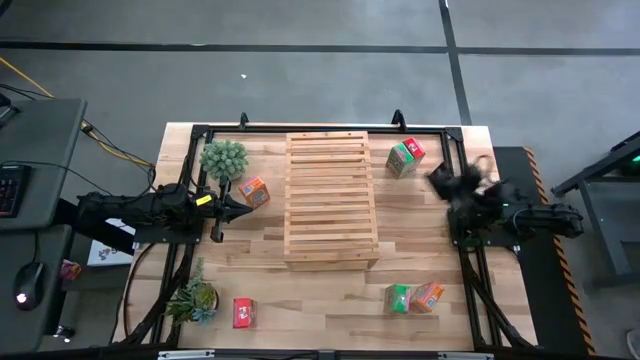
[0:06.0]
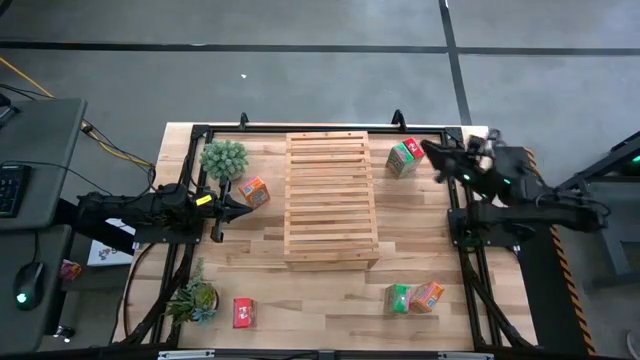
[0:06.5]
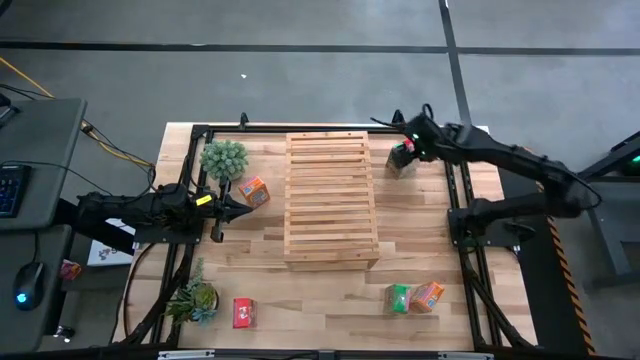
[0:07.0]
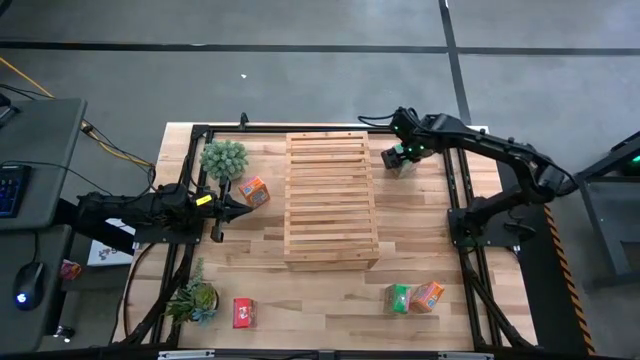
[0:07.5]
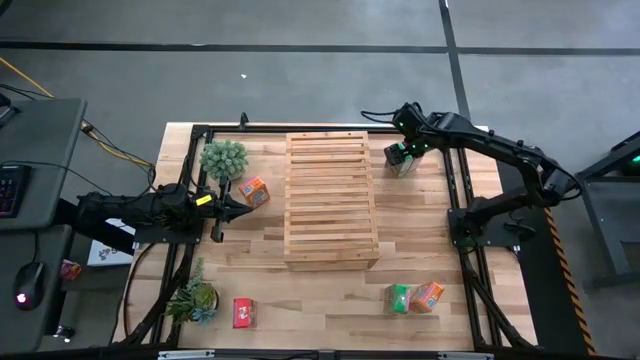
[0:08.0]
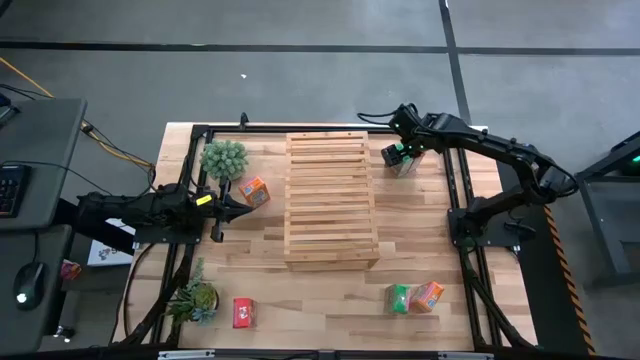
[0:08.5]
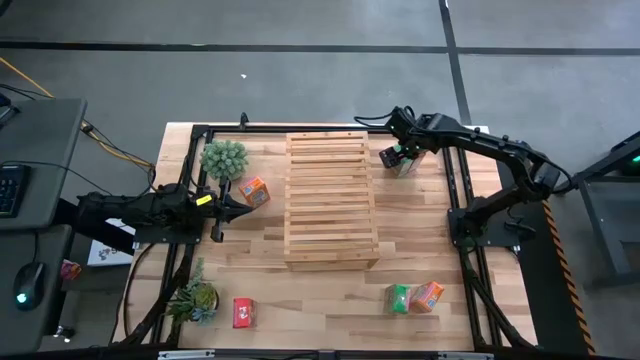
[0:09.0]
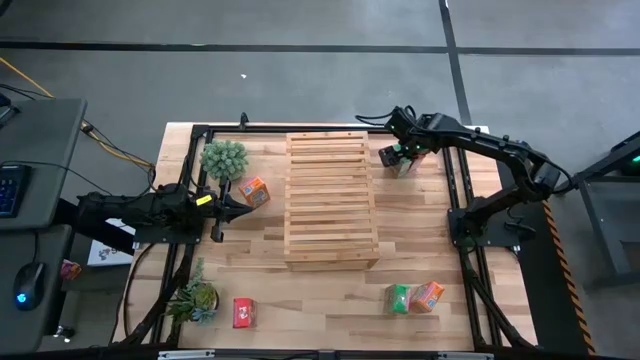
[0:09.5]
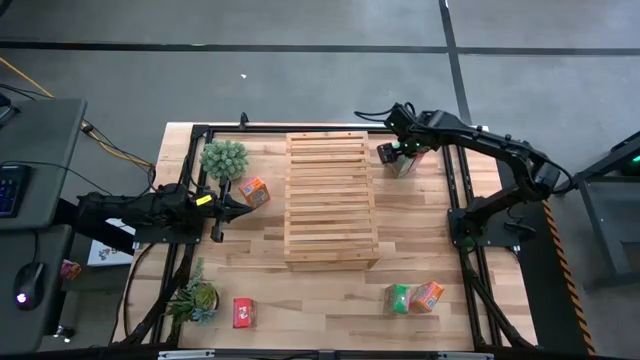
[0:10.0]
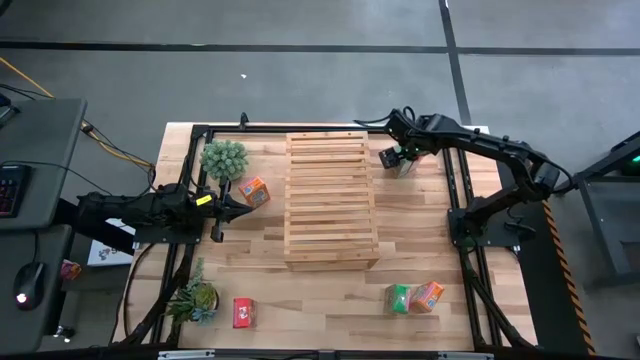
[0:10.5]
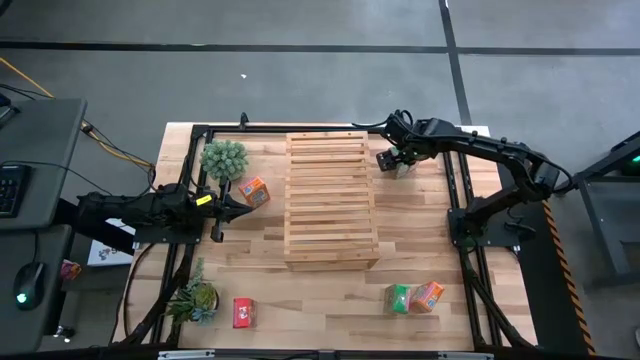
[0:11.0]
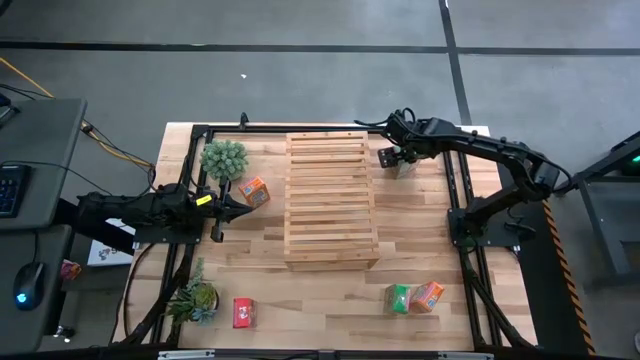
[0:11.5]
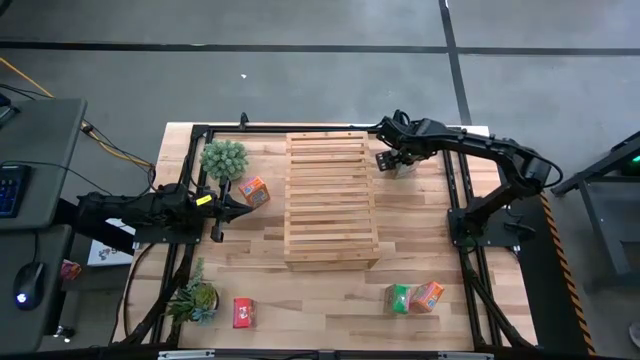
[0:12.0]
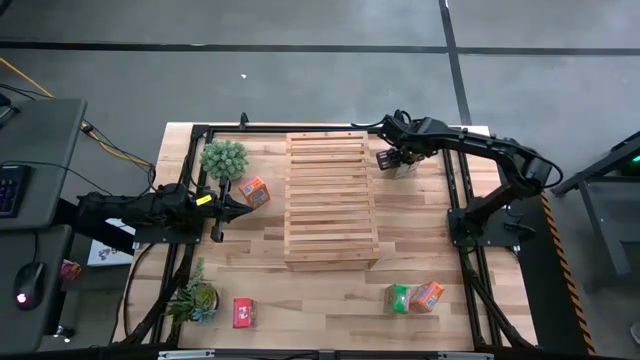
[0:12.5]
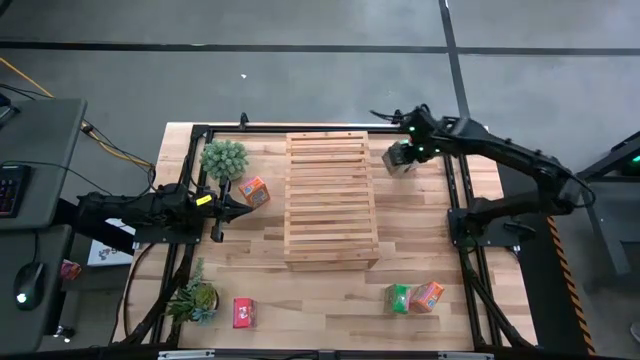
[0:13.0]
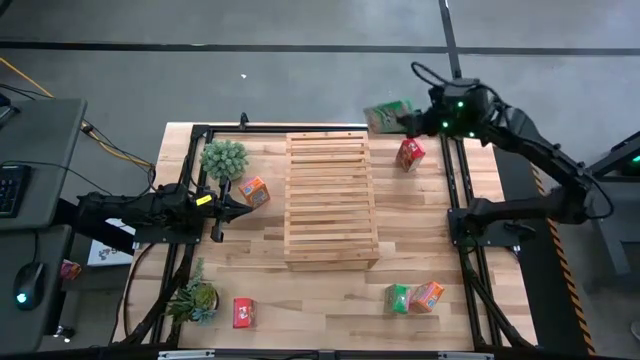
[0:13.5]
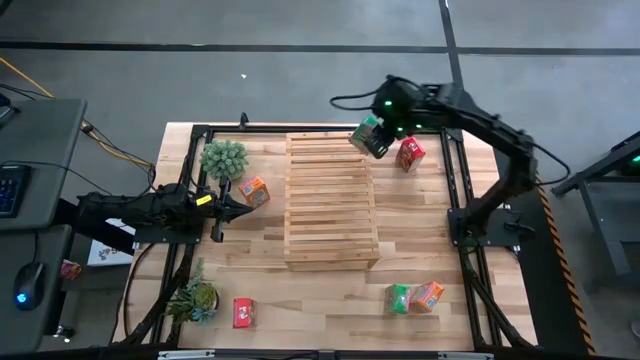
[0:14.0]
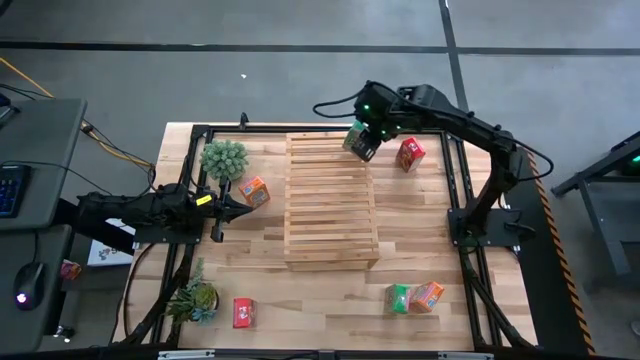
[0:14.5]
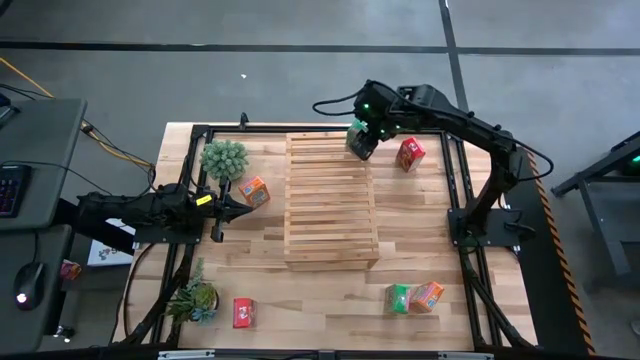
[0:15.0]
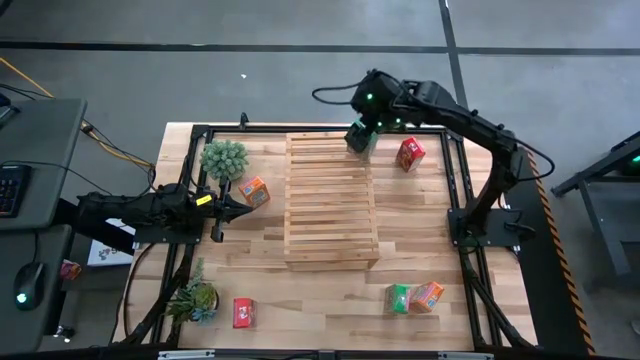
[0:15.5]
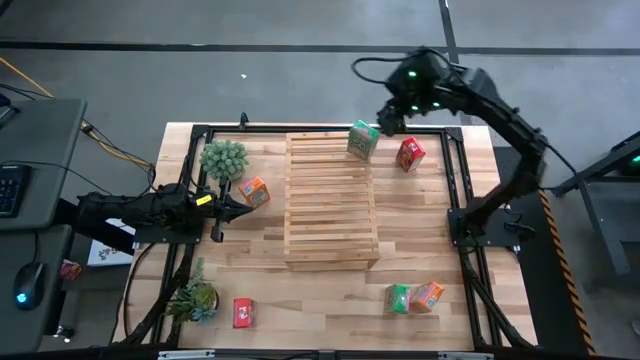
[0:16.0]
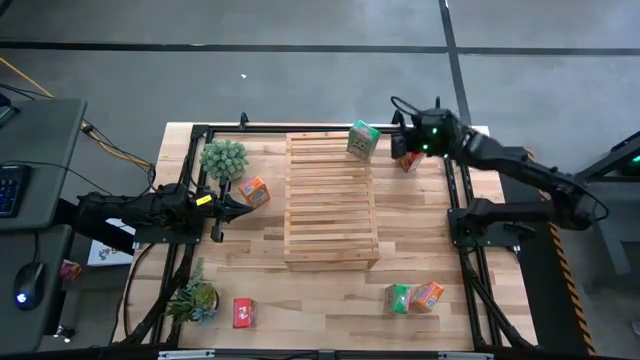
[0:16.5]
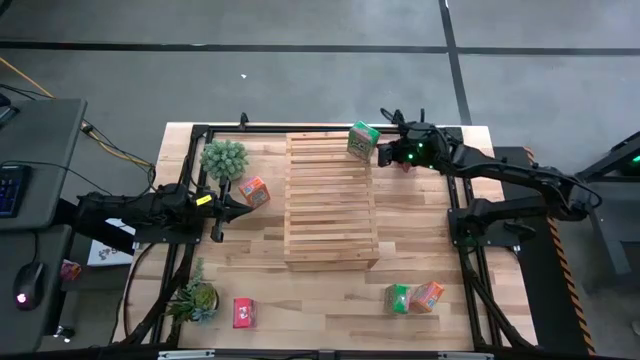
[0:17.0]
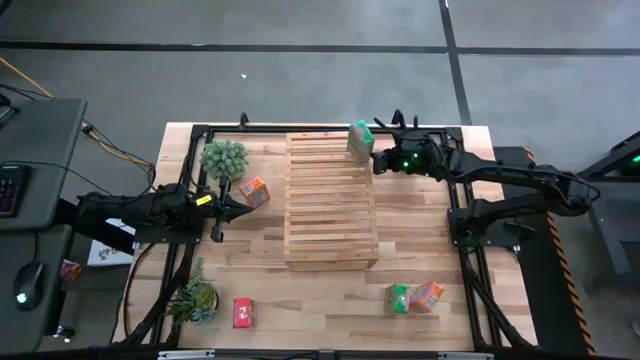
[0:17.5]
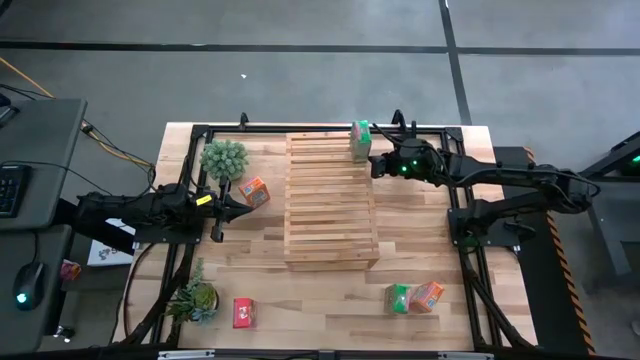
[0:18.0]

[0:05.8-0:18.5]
Task: Stack cereal on shelf
Put the top green cereal box on the shelf

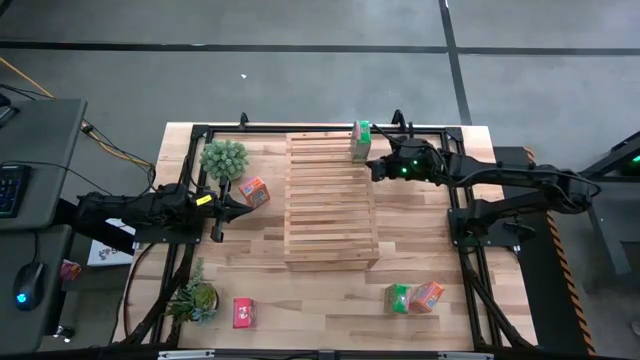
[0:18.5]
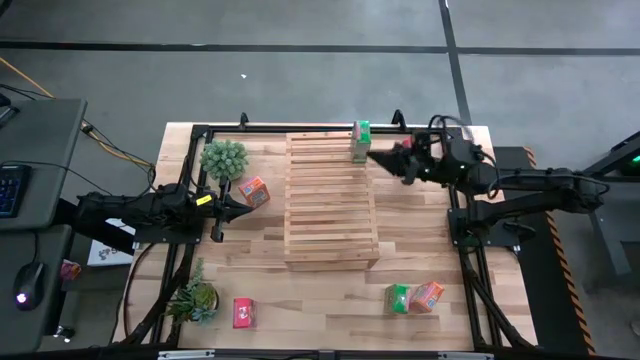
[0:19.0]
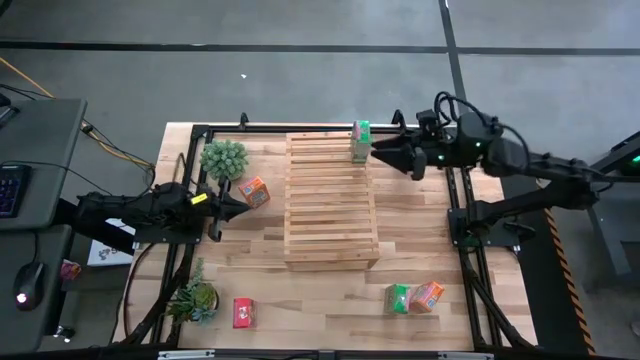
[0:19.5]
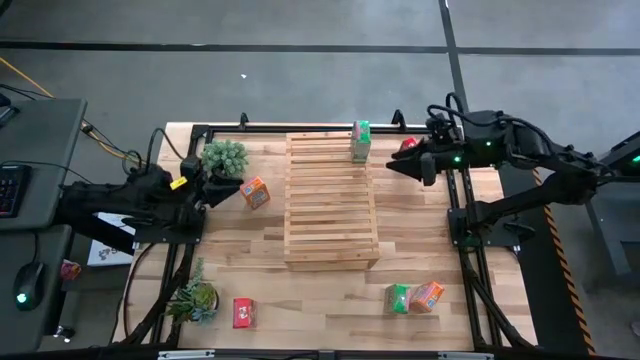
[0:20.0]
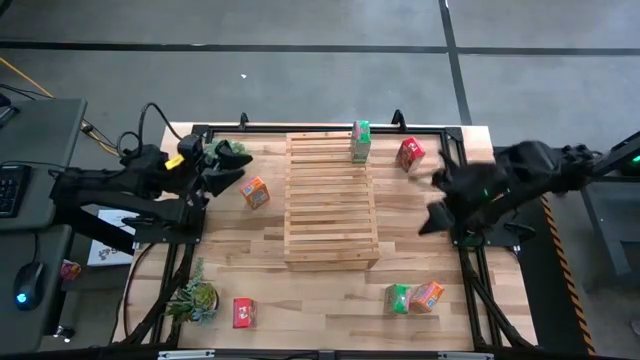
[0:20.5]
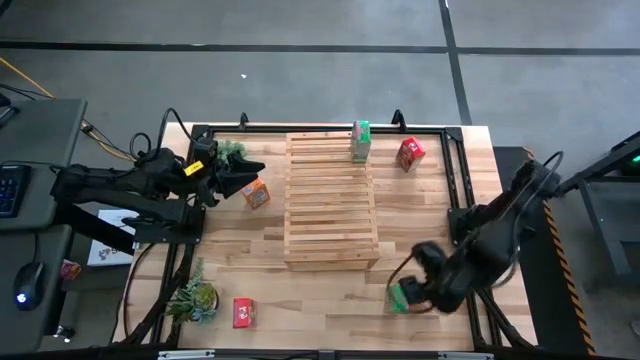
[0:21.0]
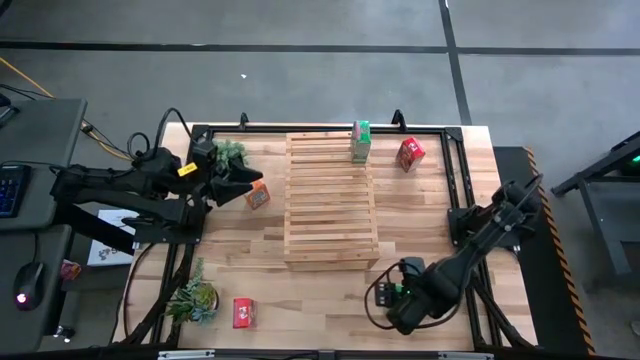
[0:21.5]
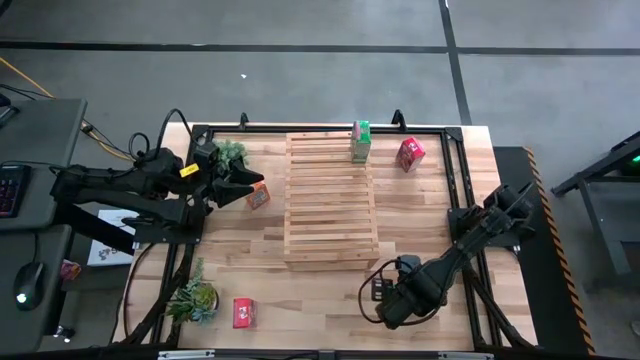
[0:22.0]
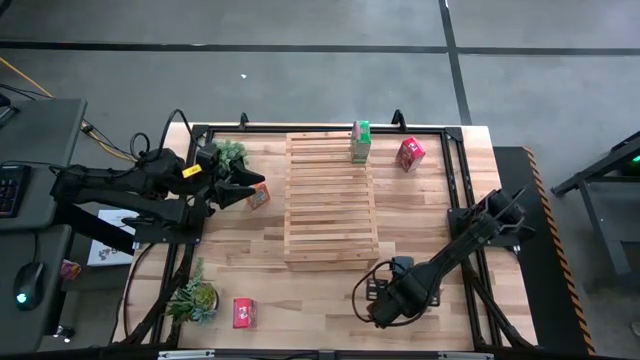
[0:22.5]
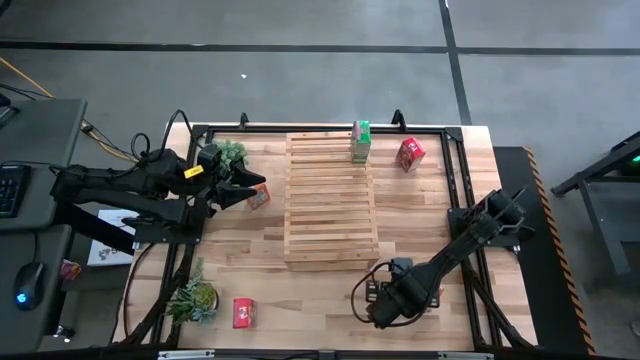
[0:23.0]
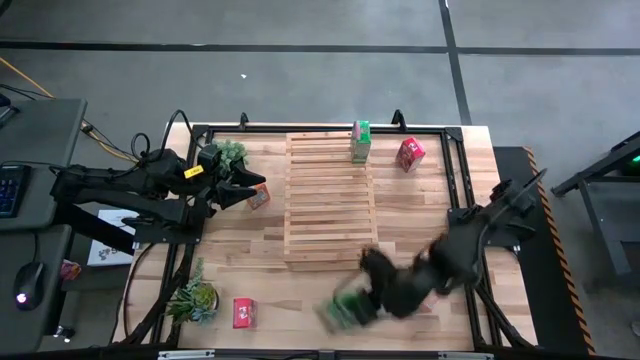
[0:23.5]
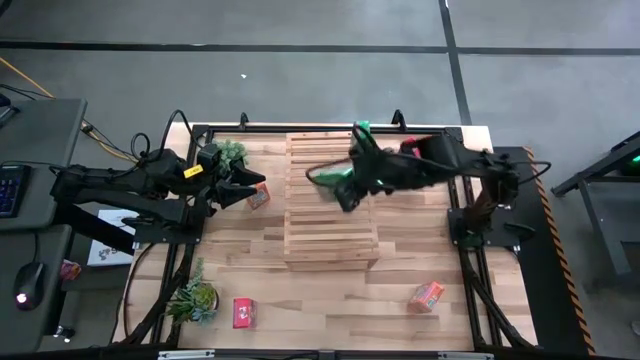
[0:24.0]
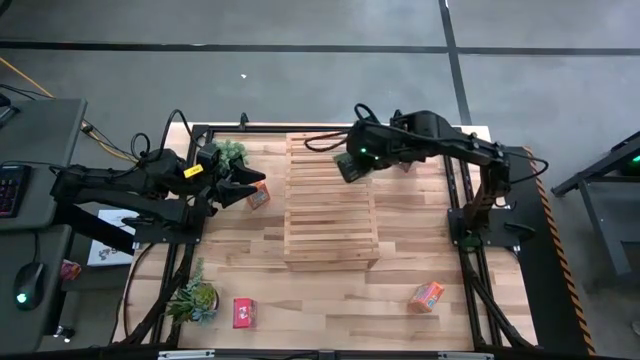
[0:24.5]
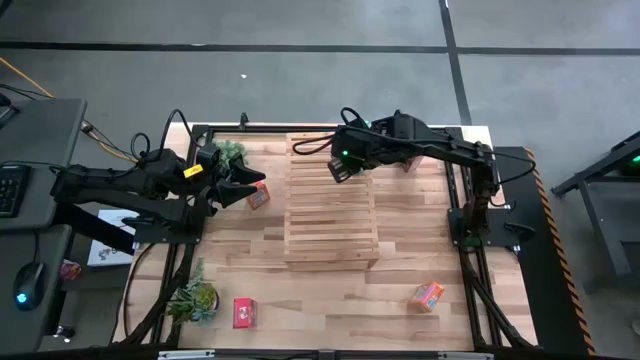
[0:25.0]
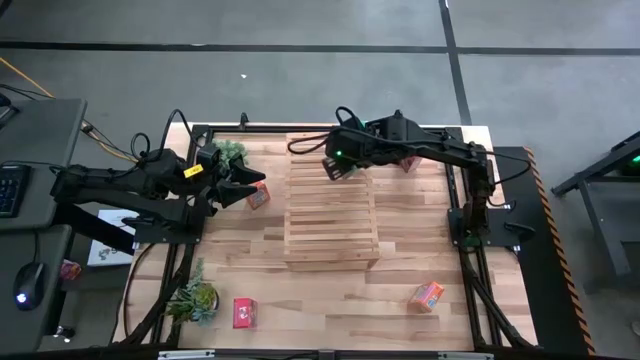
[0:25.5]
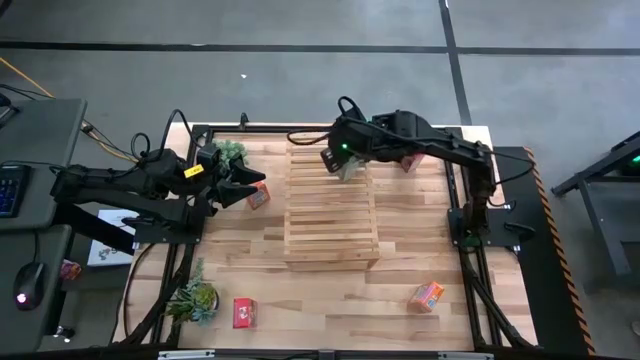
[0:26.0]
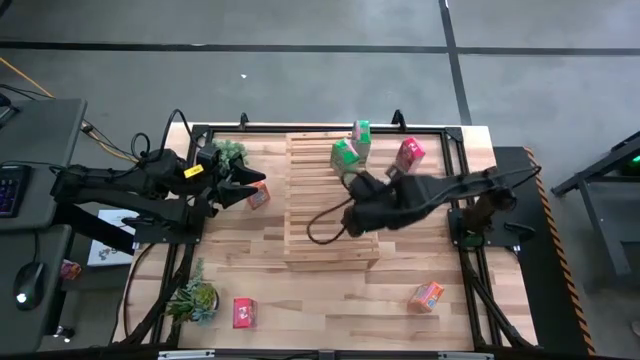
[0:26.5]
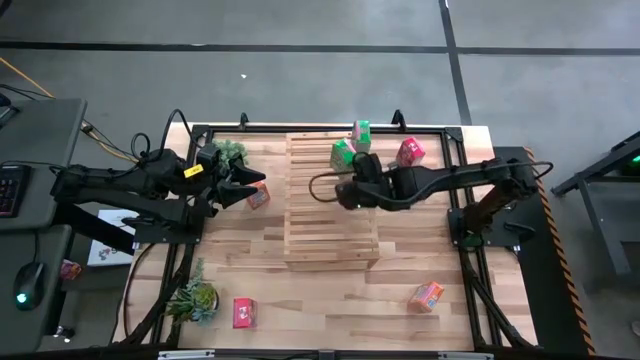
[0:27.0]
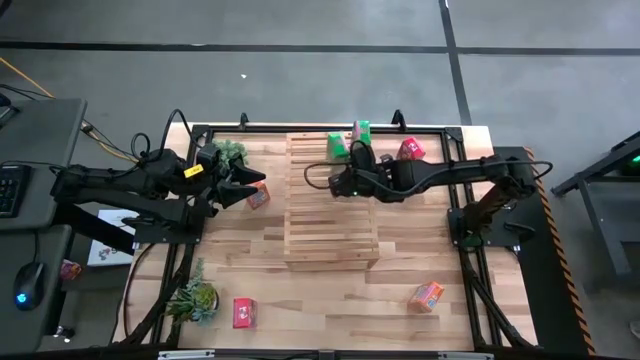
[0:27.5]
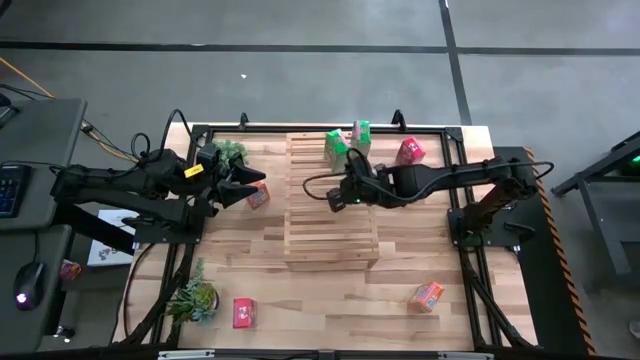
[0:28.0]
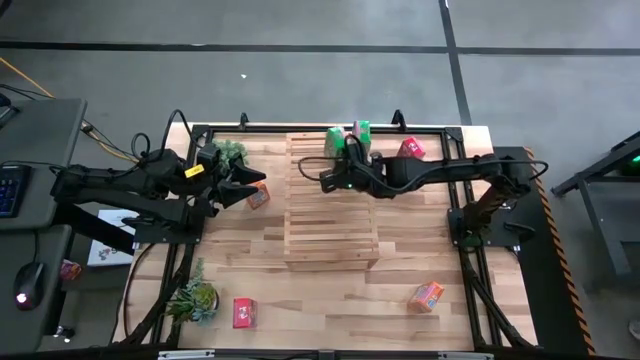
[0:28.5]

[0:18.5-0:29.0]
Put the green cereal box on the shelf
